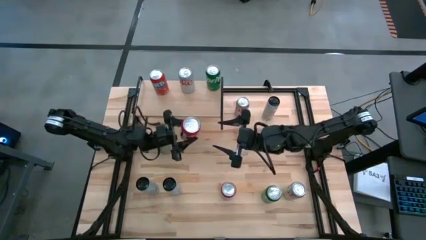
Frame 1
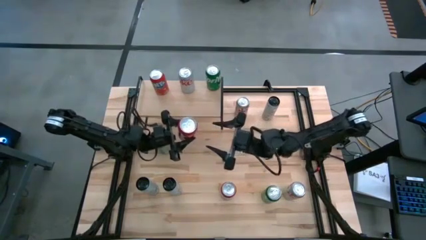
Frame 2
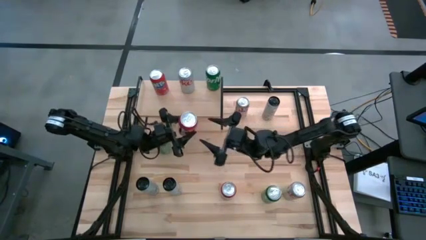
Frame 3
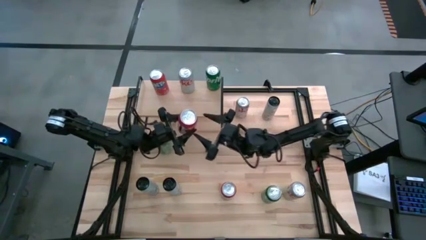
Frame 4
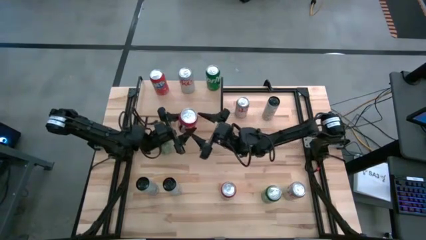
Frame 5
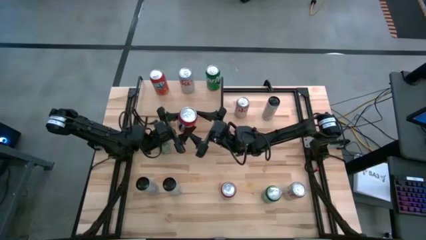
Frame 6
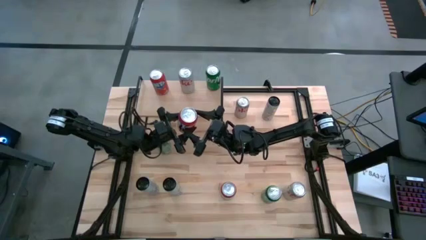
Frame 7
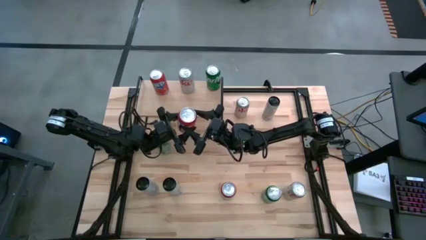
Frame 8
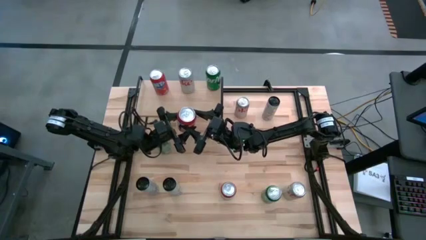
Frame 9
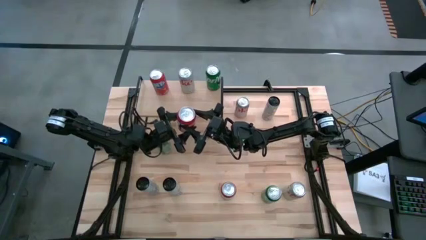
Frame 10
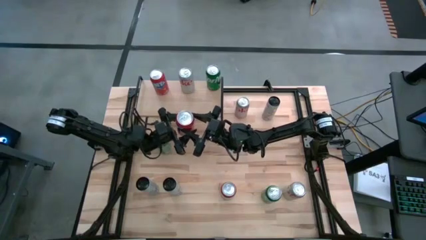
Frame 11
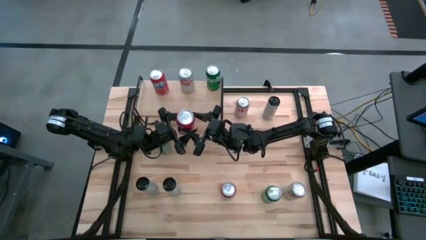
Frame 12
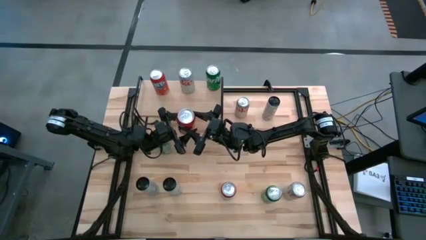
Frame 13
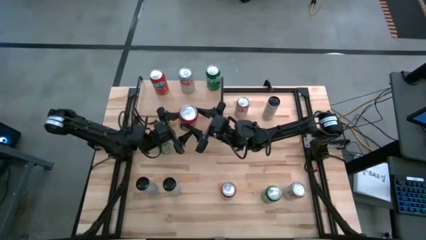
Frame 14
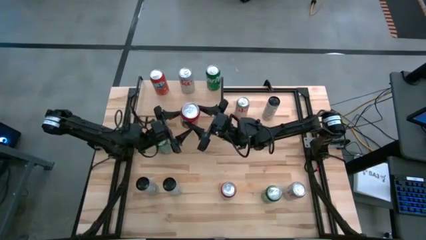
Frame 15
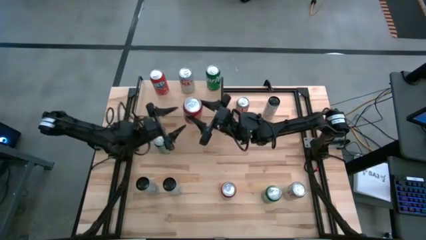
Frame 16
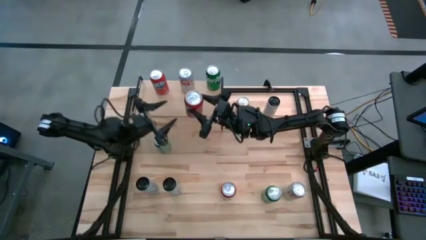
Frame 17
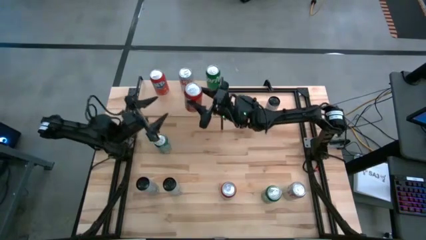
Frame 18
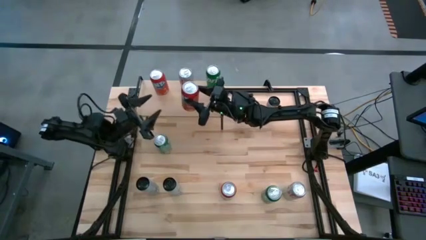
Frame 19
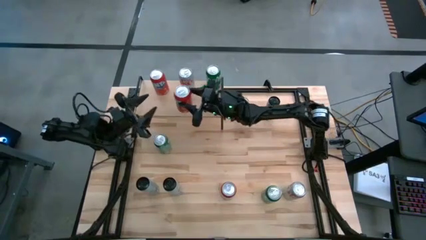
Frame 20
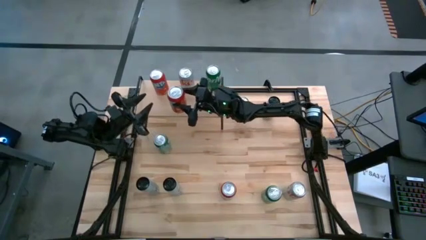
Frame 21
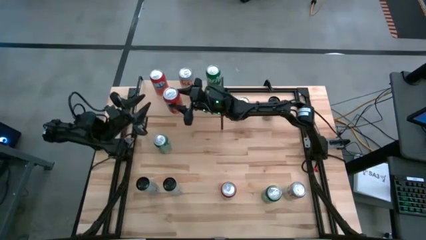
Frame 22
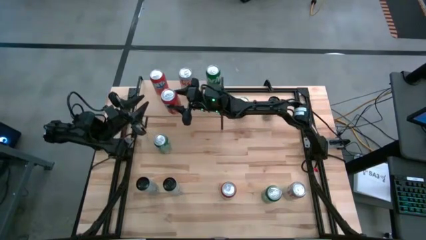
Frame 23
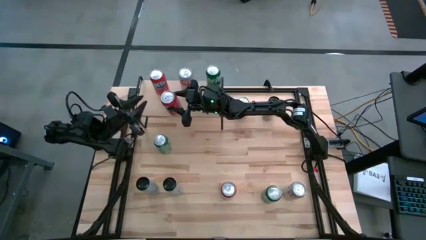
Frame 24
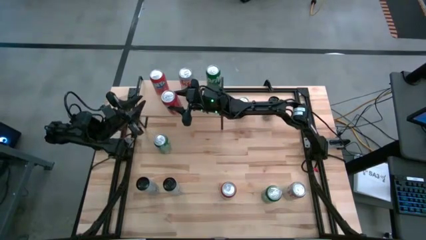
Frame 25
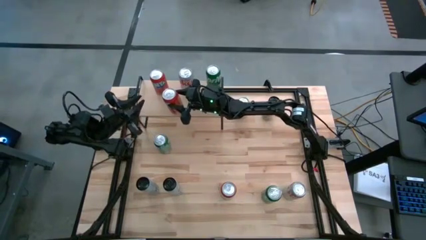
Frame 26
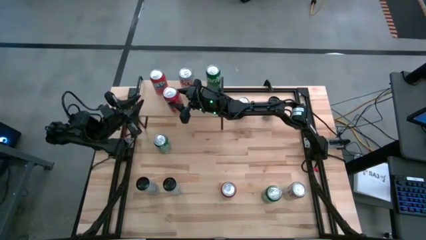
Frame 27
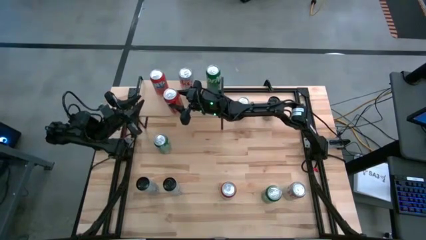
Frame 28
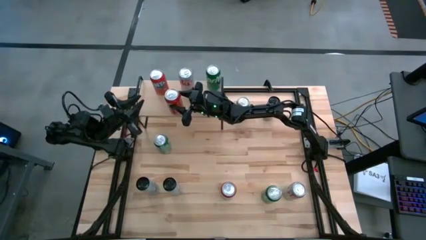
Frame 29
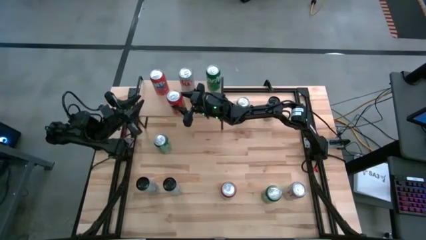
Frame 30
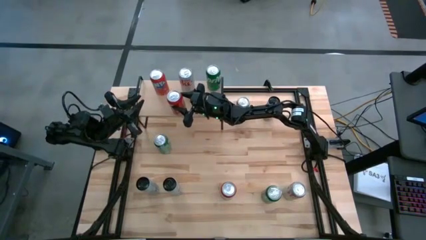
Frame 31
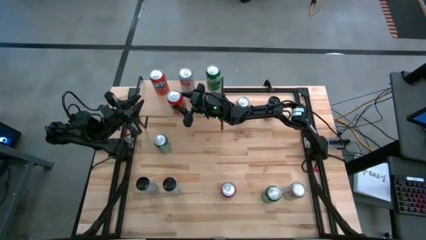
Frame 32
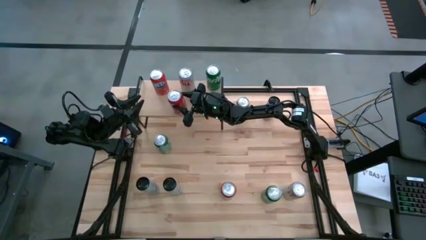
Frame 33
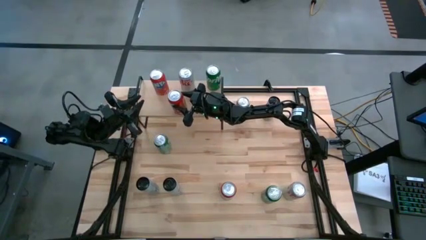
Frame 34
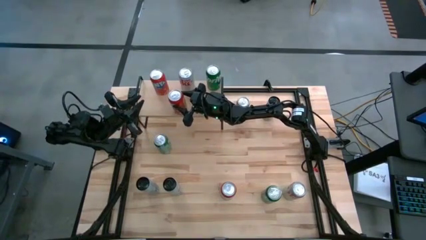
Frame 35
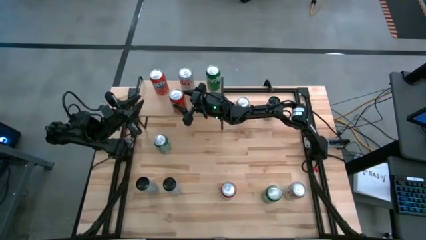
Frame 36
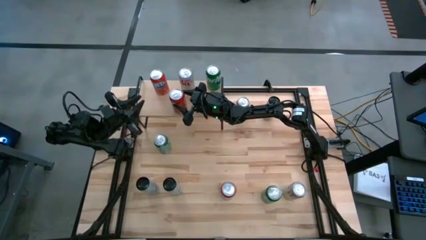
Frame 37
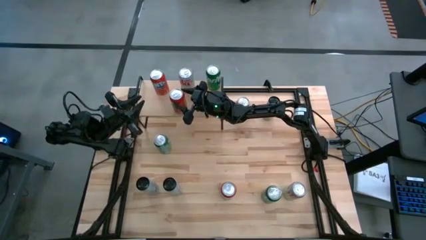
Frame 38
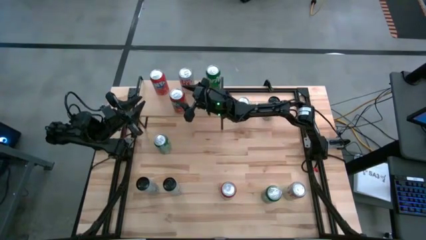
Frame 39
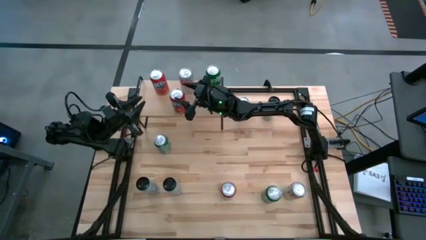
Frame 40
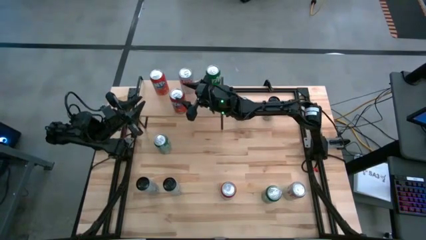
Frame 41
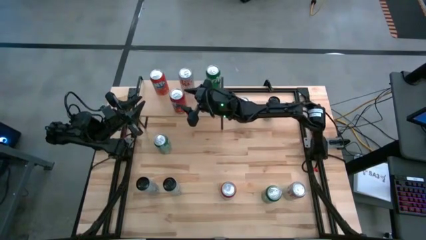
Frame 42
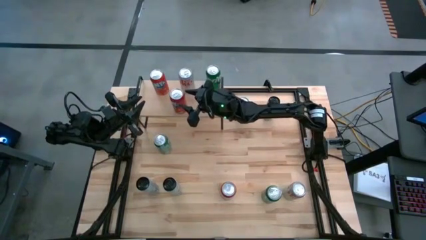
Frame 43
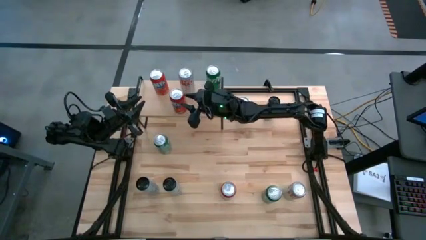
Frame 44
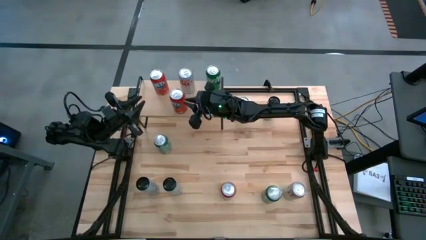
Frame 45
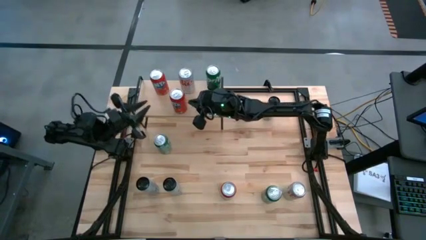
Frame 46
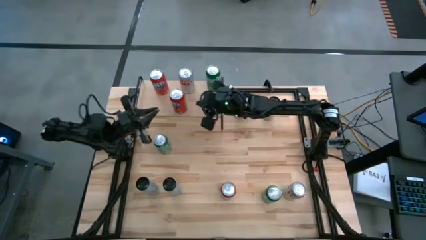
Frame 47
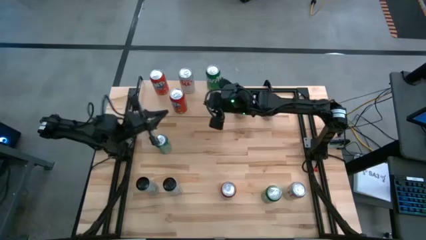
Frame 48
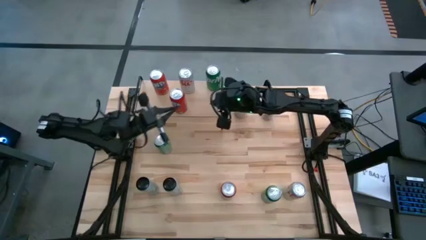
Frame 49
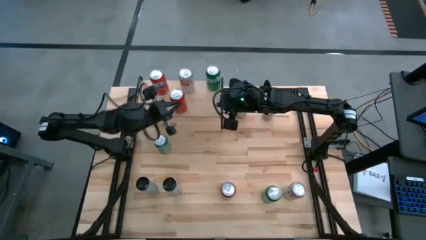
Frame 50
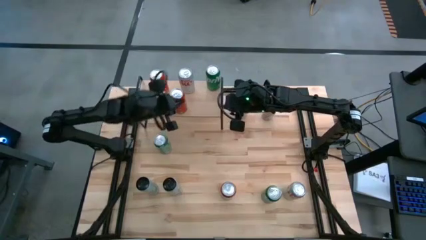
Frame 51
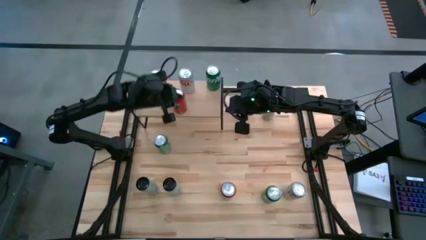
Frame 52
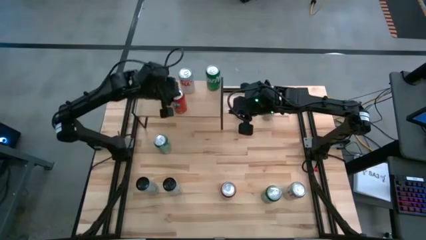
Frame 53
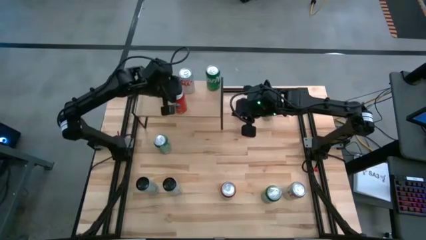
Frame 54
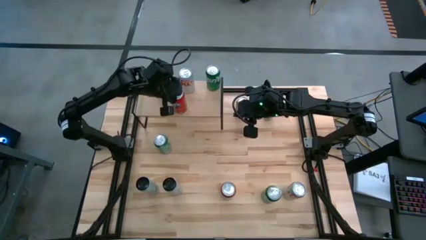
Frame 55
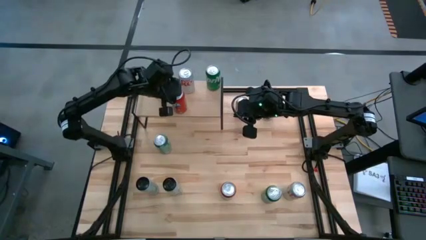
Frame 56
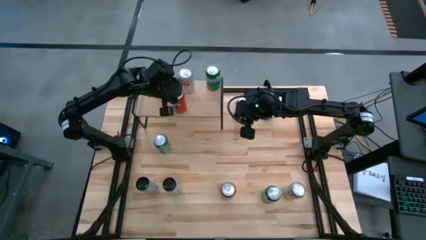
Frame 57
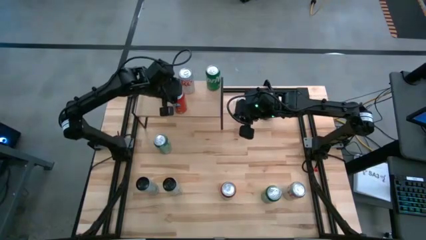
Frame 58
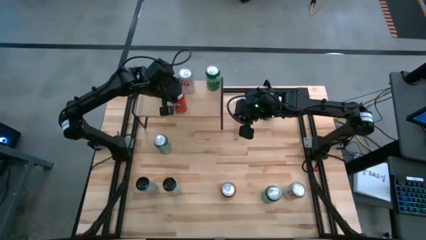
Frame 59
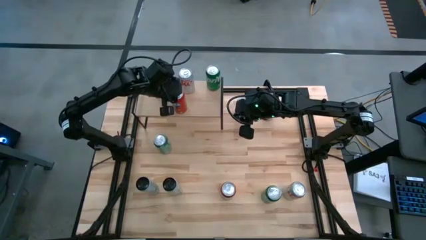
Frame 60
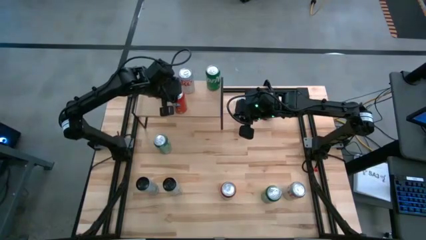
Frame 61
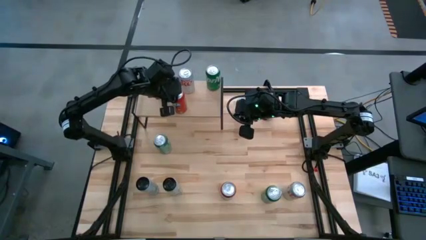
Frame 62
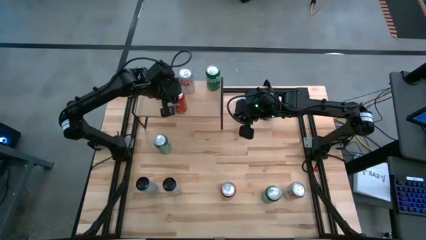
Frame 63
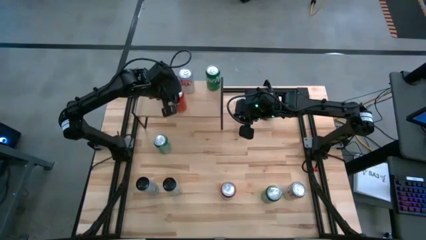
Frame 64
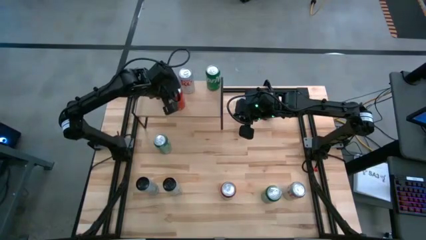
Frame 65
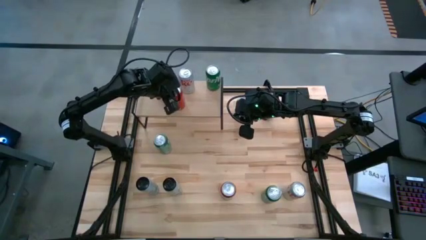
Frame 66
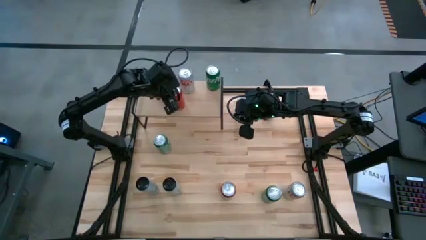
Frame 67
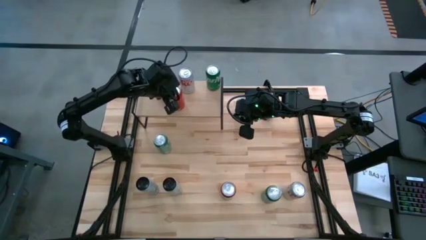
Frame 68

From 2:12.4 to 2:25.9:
Task: Place canned beverage on shelf
Put the top red soda can aligned with the other red soda can on the shelf
